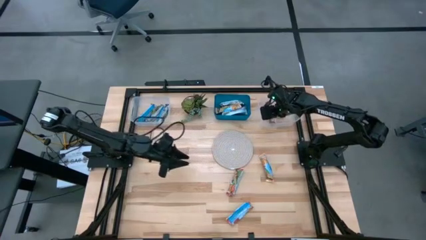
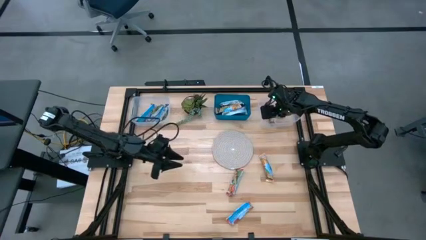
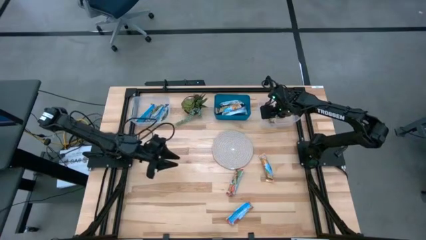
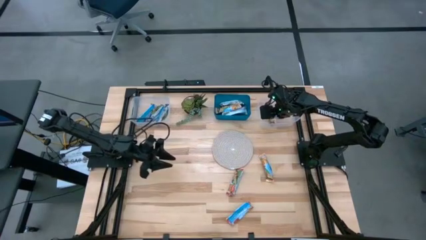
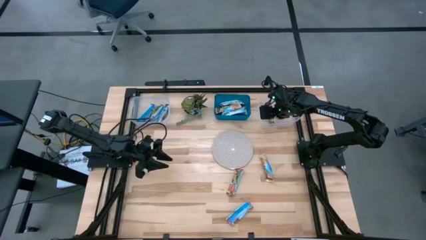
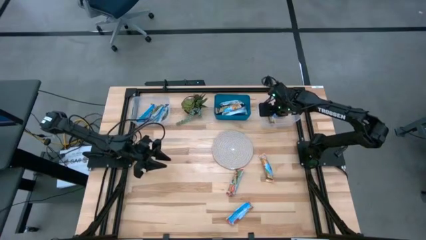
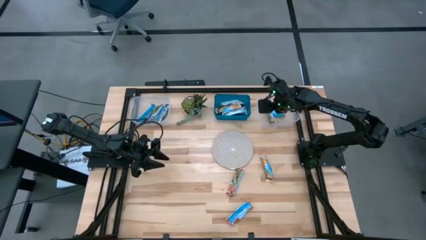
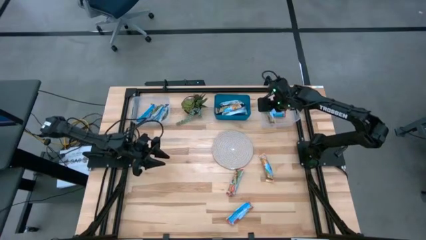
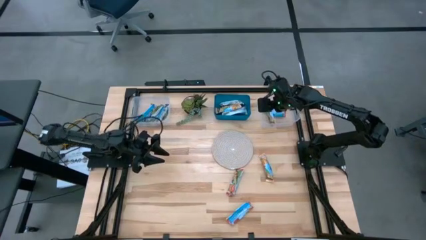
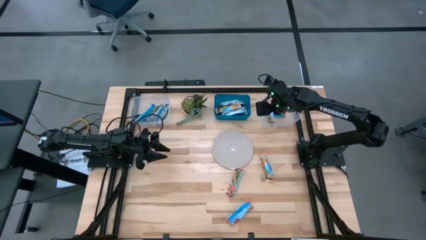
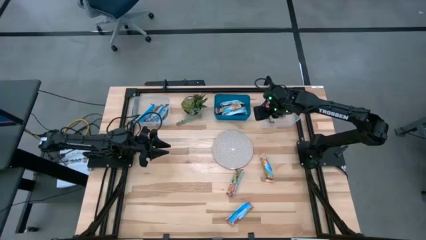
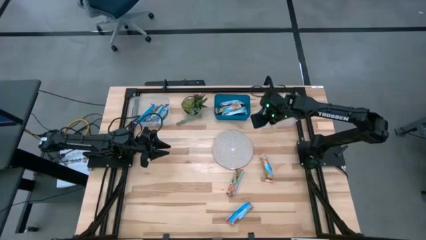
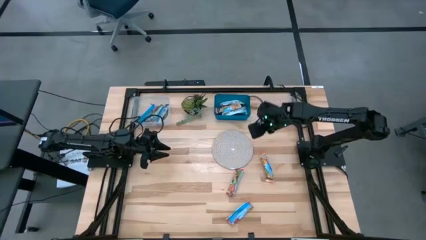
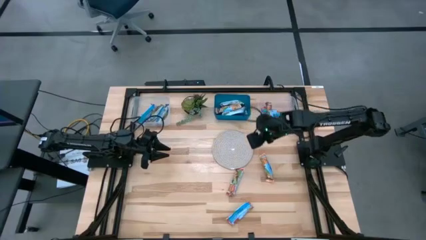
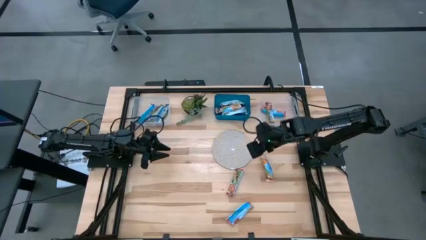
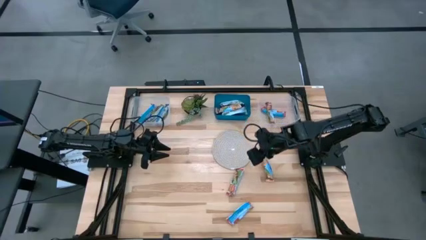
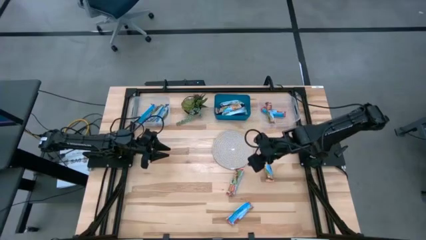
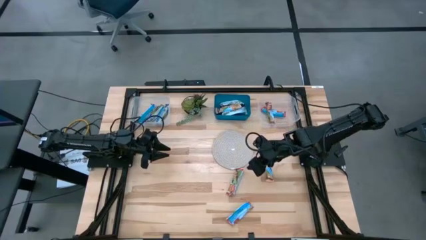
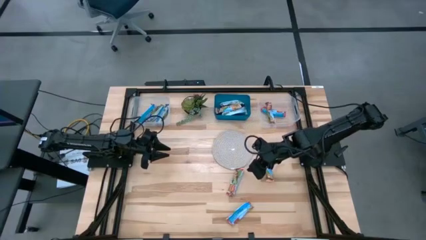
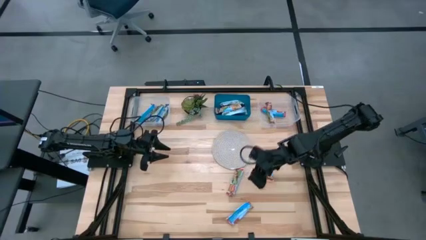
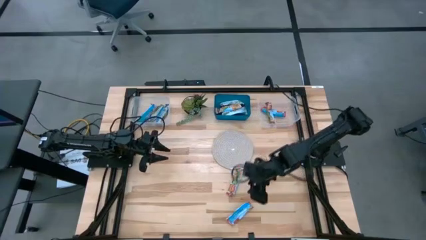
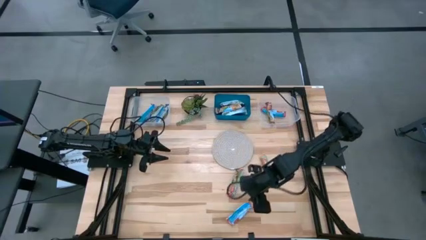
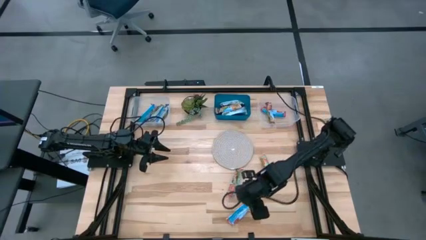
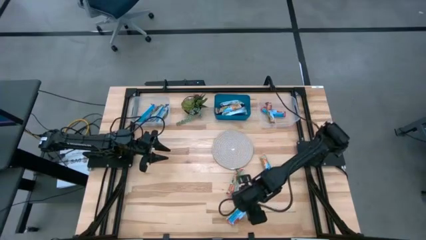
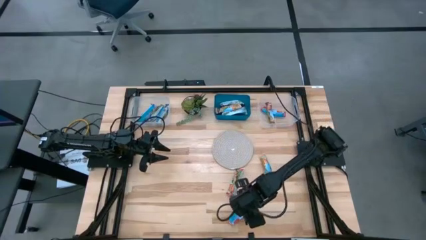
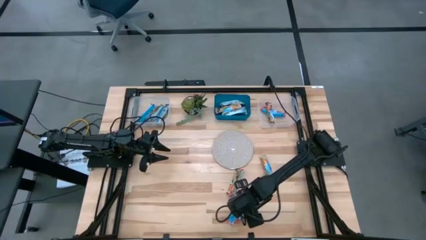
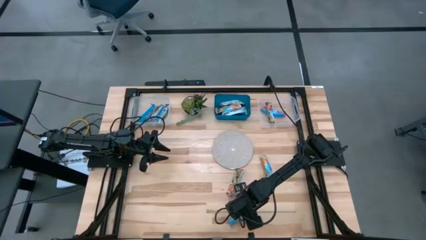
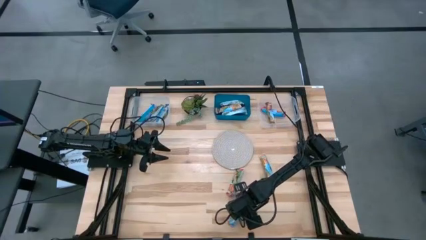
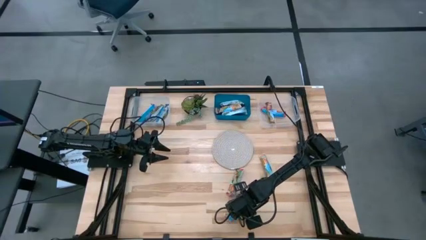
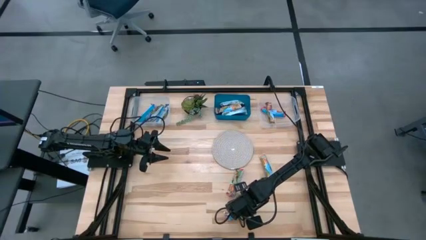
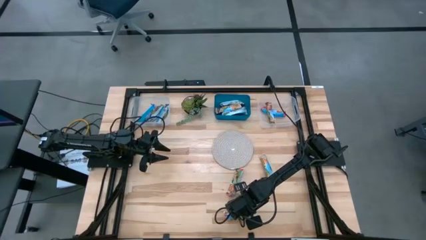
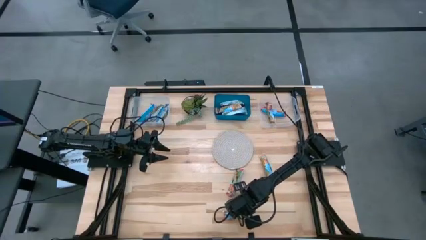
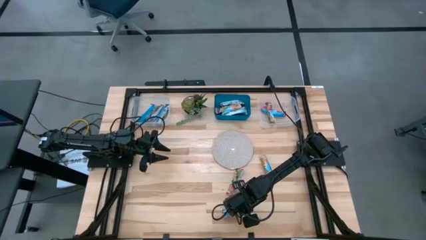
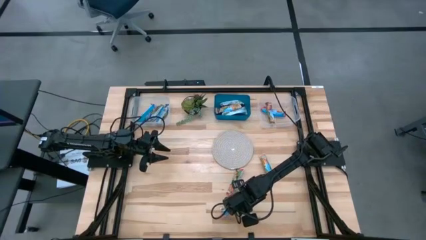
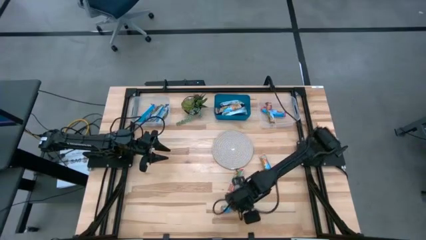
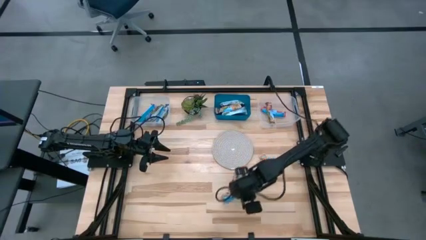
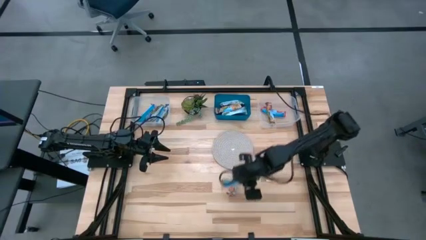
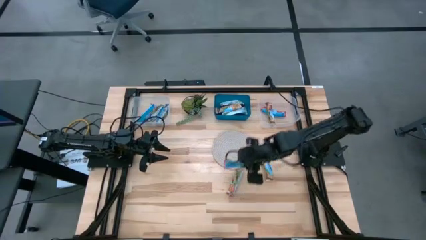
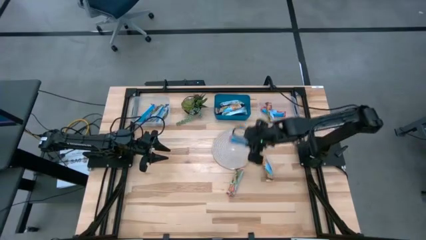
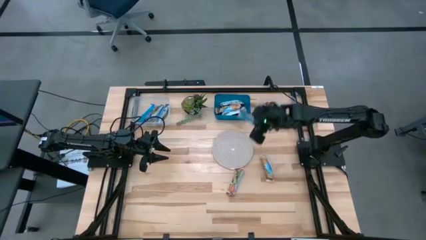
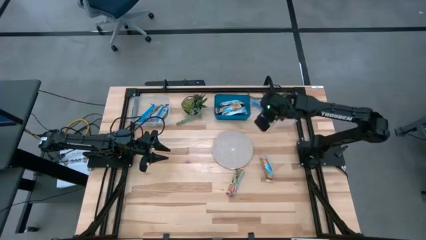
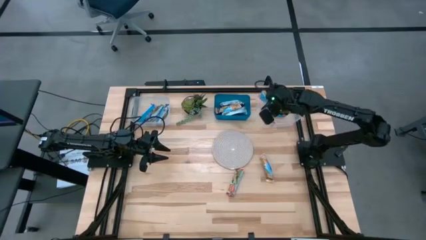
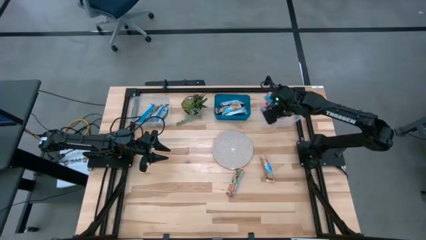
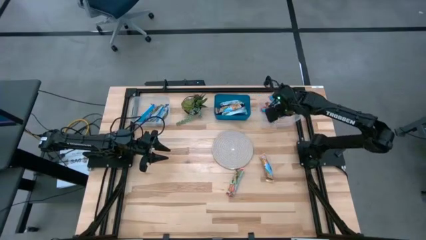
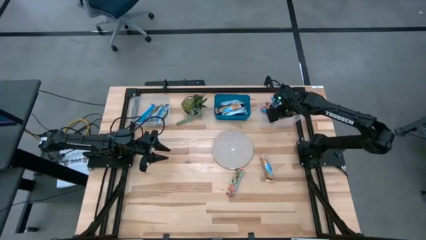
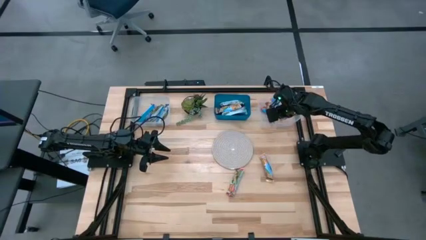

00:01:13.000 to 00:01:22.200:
Task: Pick and place Granola Bars by type
Put the red granola bar into the right transparent bin

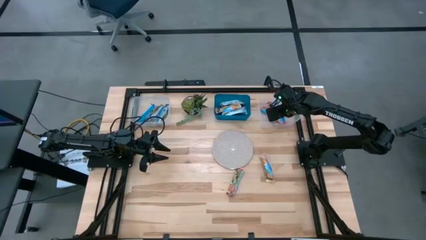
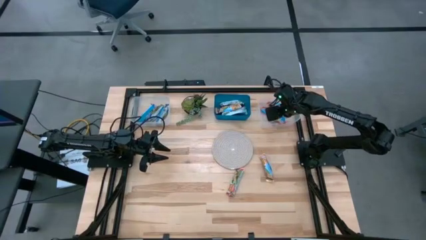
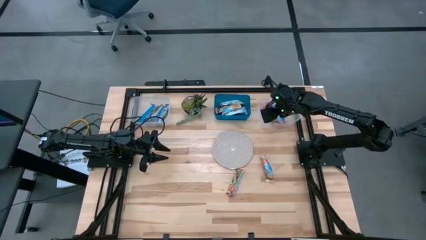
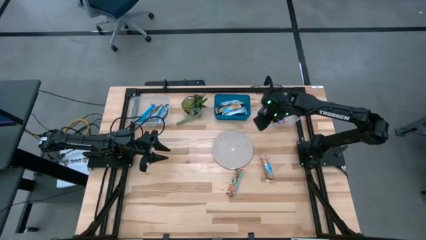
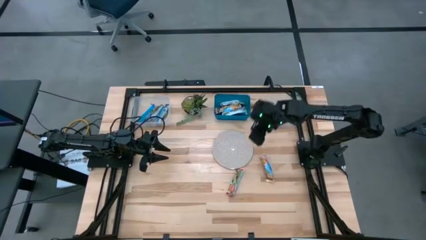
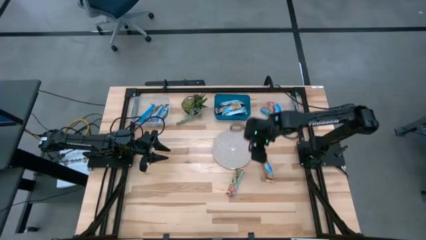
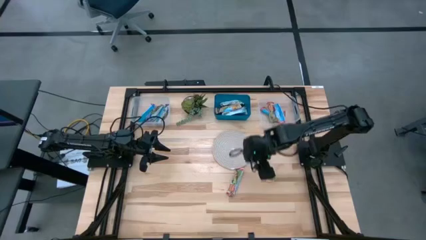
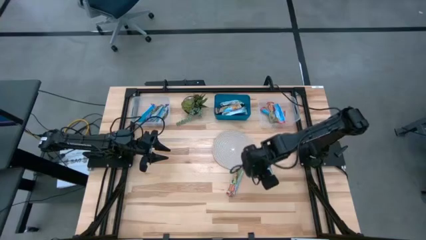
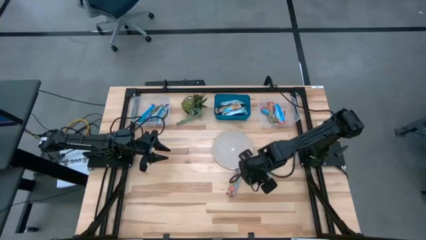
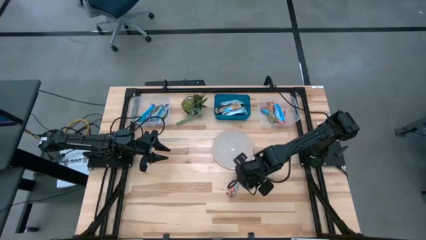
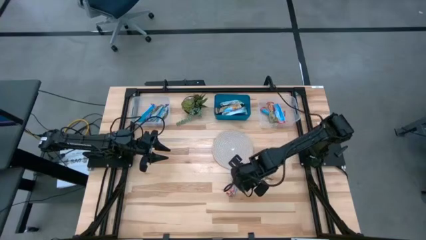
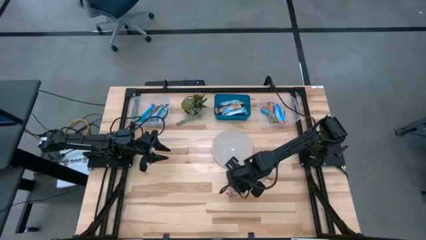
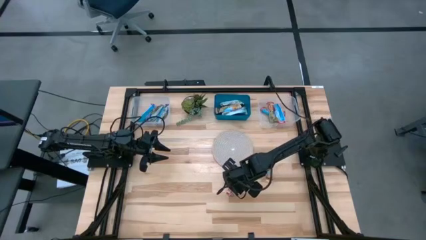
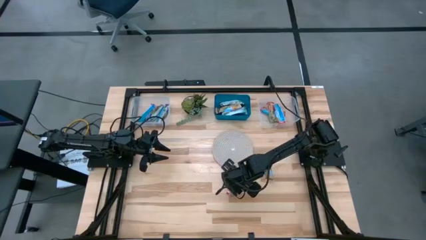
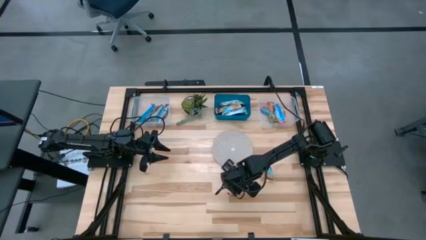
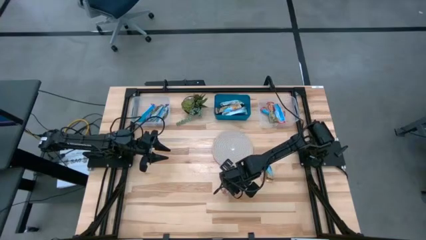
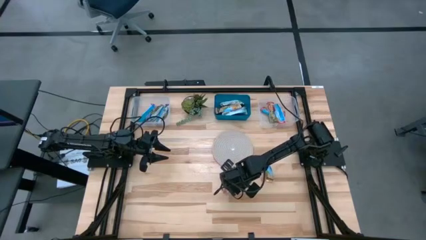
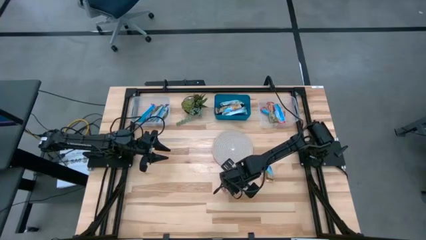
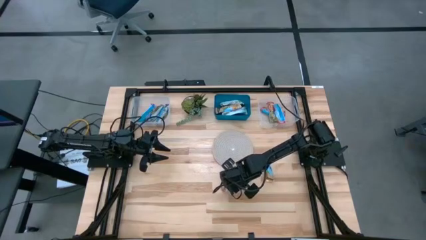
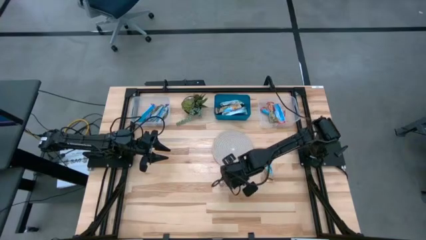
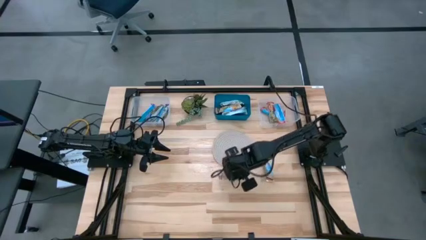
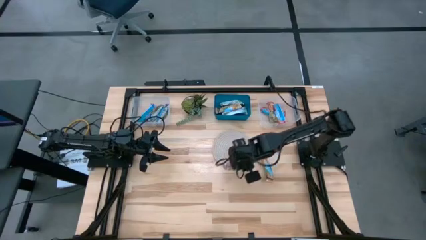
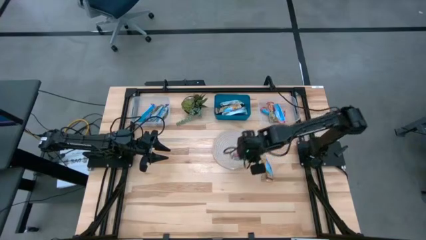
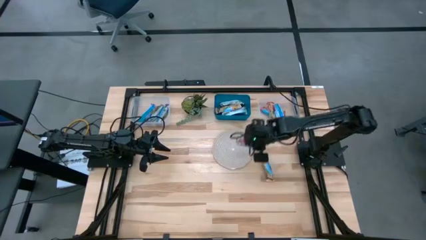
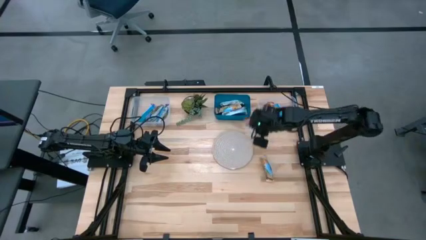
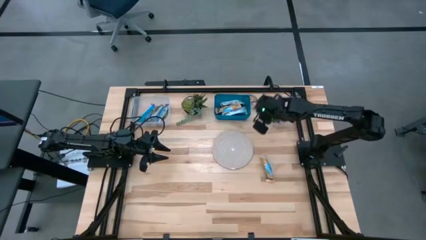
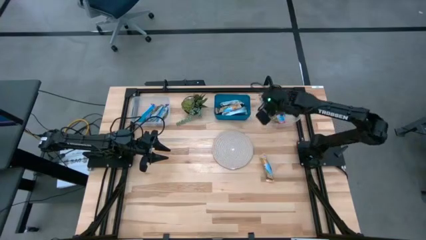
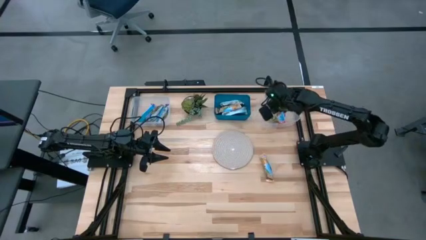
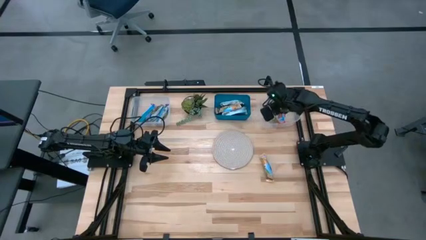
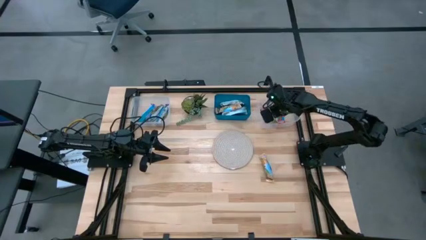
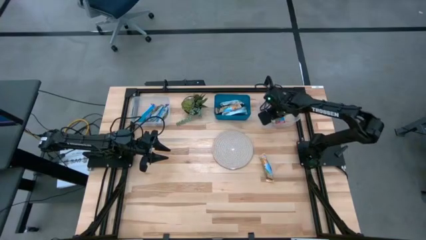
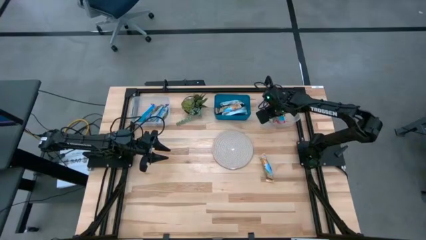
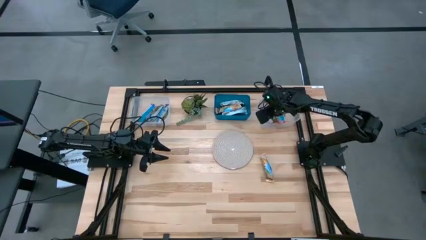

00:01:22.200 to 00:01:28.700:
Put the red granola bar into the right transparent bin
